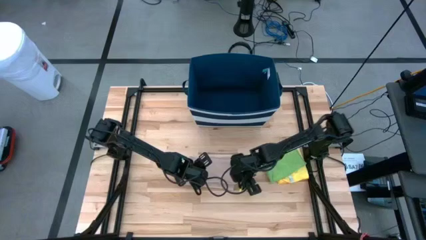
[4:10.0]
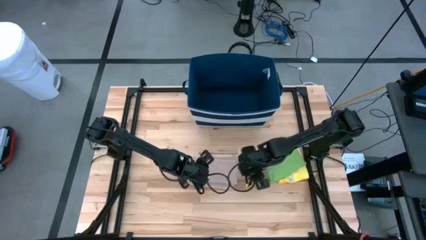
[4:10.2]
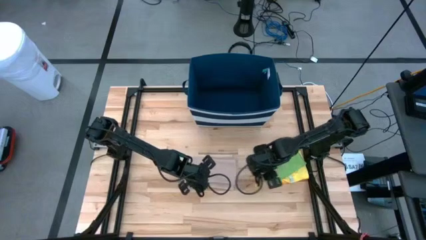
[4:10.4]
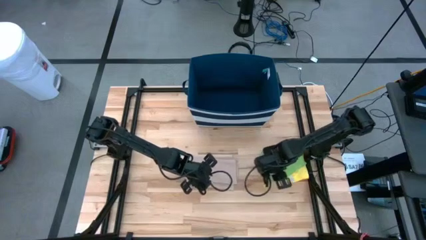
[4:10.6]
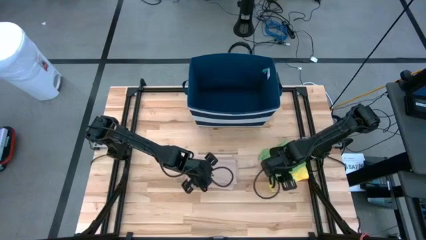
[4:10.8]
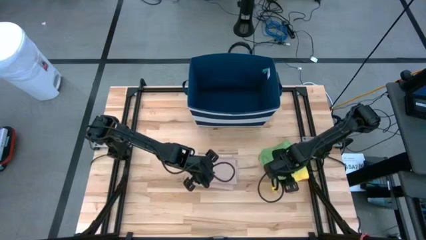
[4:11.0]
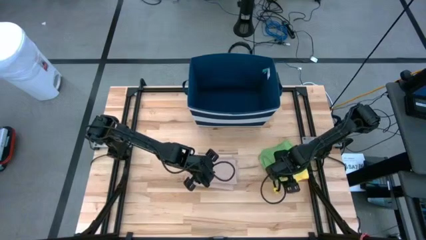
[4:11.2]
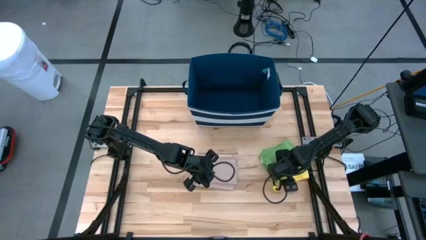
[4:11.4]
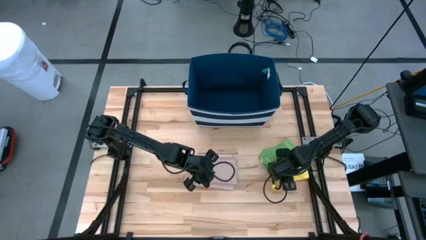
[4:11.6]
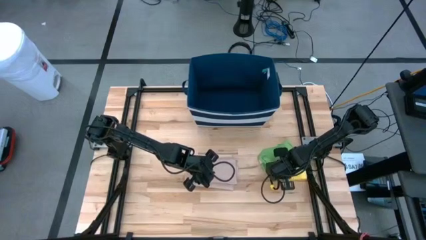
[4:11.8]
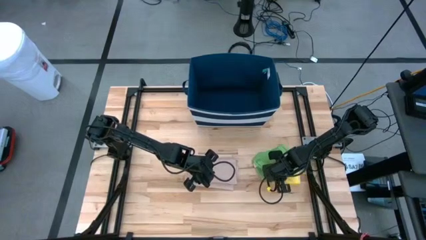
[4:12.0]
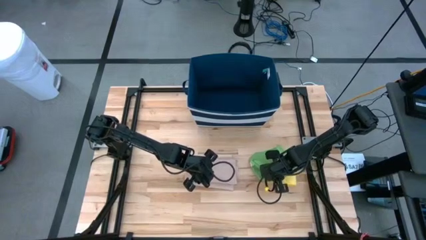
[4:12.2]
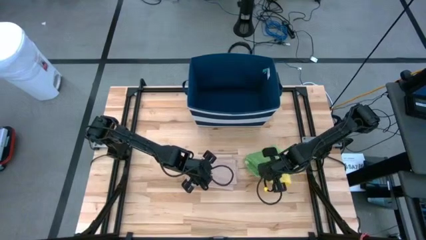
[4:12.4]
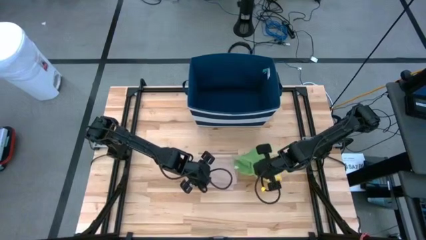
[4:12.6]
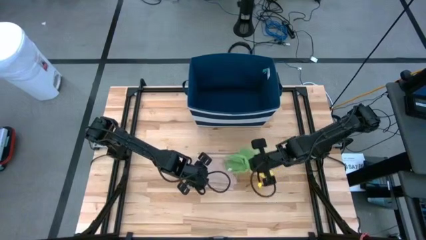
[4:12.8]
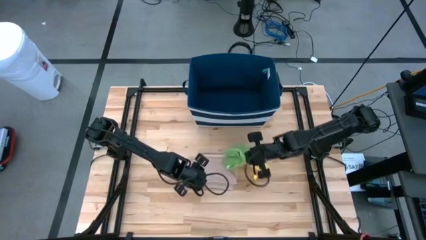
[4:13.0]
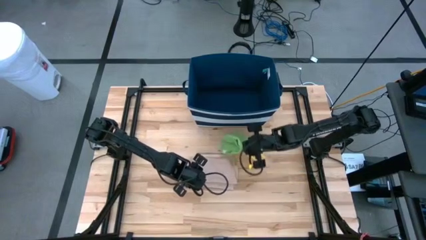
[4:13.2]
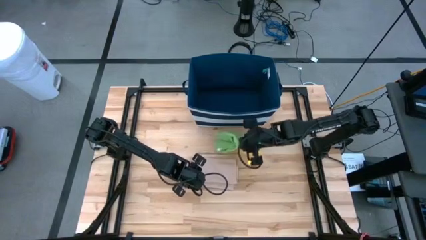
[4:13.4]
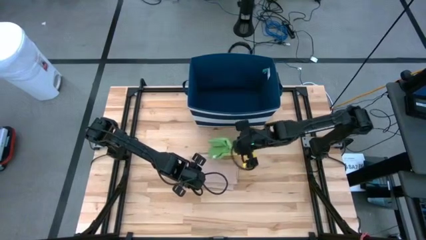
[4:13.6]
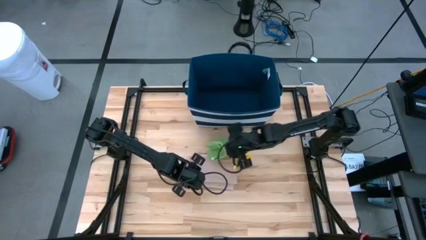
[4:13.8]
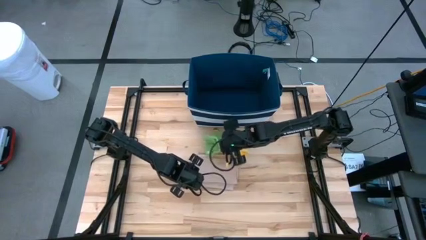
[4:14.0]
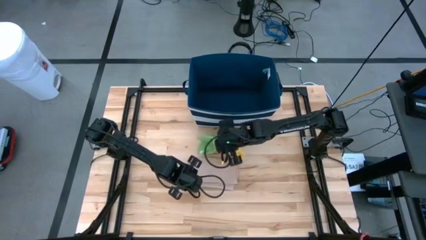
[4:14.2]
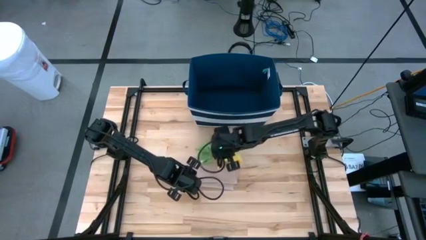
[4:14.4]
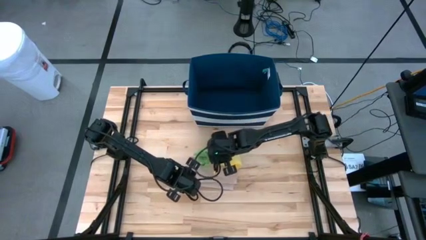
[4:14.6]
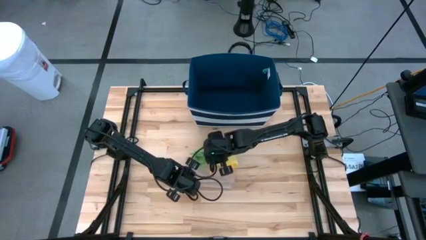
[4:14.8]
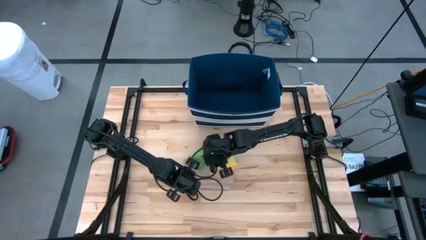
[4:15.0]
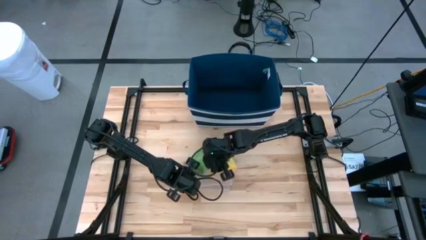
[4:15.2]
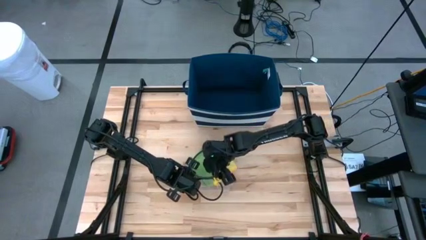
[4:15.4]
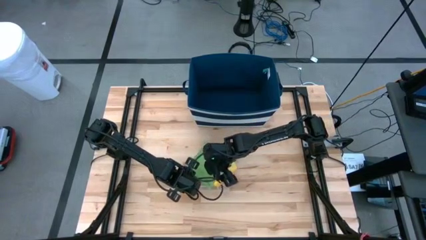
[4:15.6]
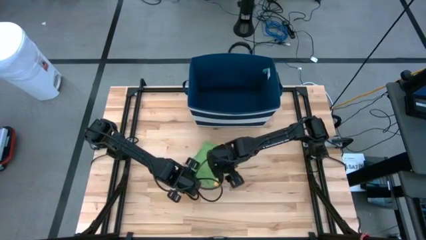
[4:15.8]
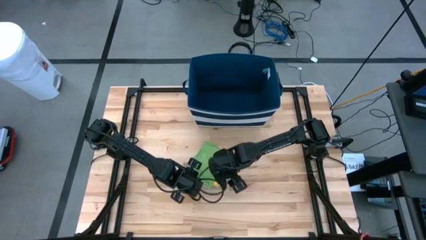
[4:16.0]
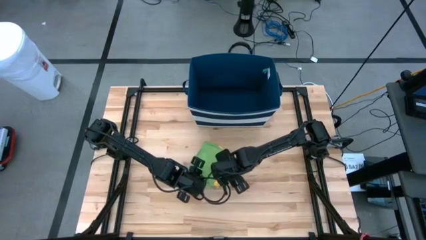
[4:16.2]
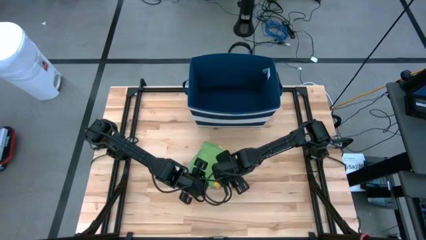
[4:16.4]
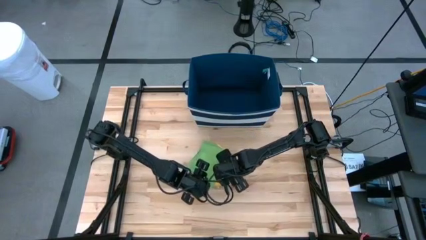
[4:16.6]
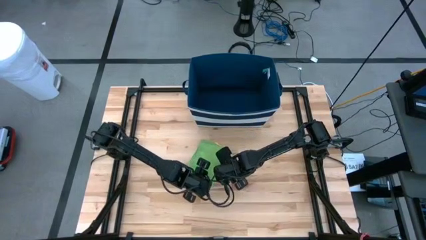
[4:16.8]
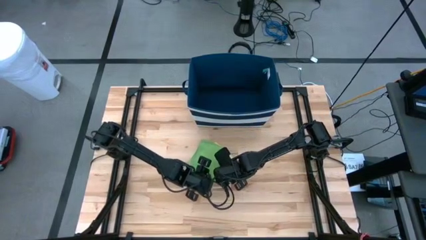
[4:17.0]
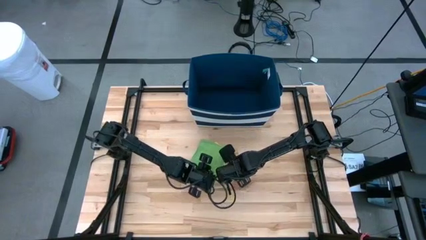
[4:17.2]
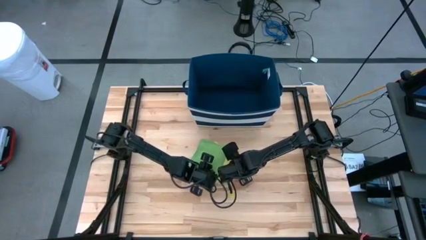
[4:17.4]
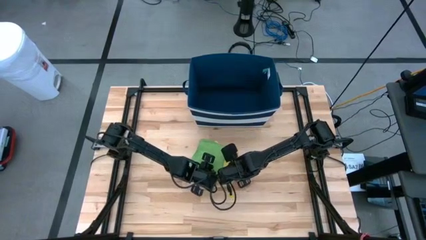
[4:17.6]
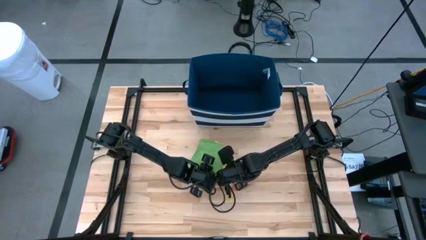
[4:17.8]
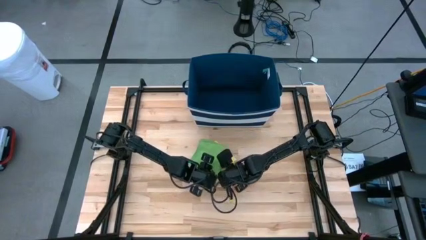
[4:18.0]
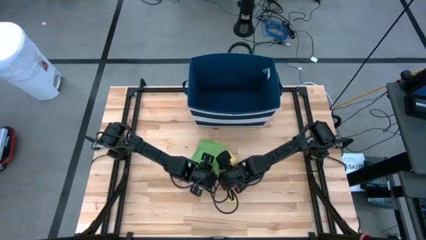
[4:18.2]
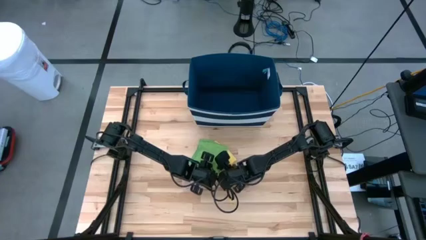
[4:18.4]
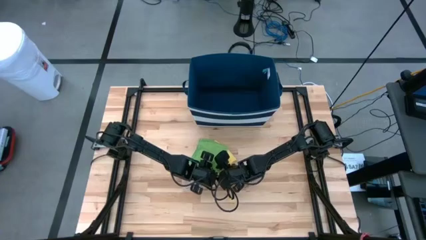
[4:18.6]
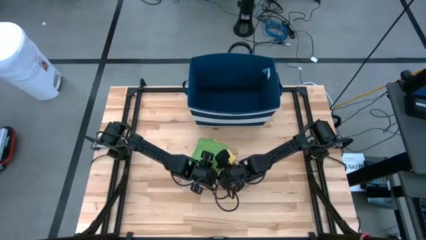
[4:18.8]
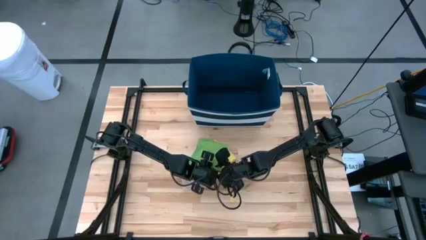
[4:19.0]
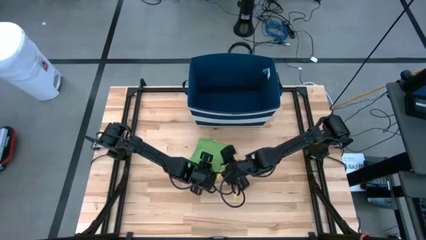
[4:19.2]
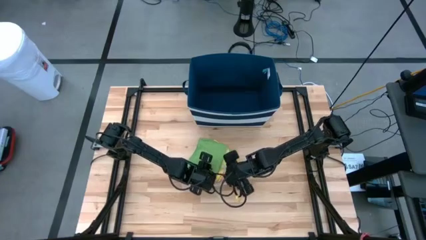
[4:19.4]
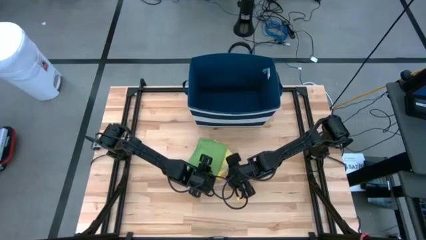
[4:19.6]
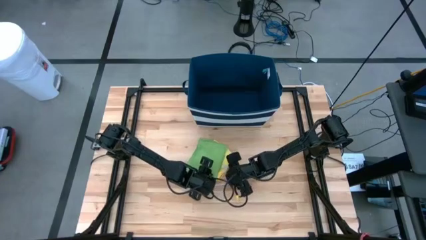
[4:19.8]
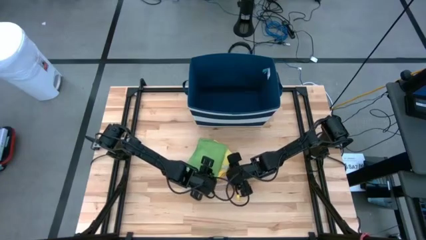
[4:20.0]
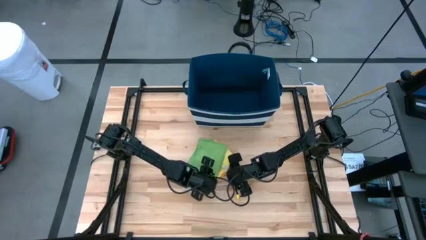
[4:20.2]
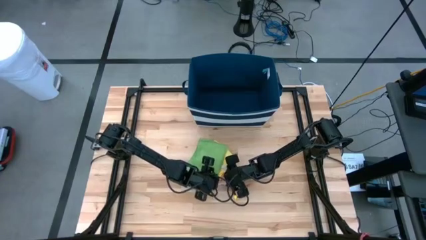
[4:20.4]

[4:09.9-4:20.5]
Task: Fold towel
Stack the folded towels on the light brown towel

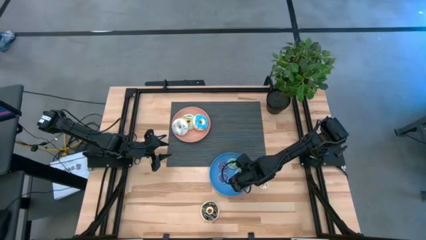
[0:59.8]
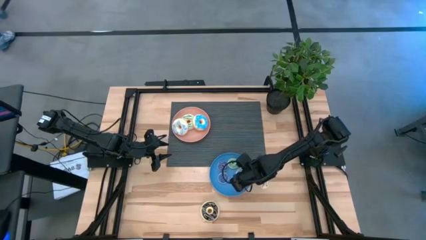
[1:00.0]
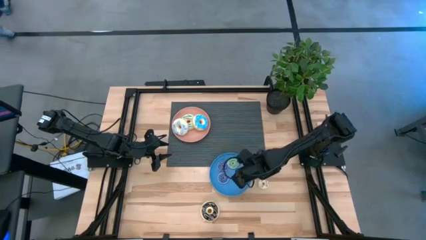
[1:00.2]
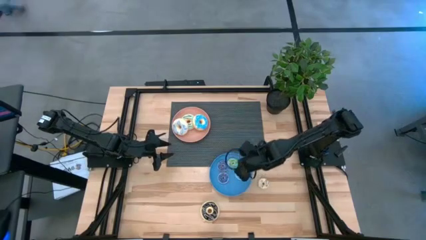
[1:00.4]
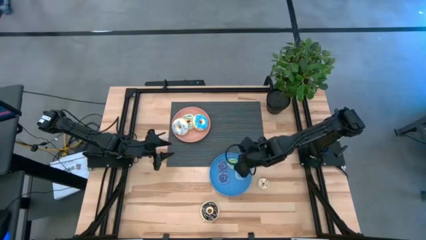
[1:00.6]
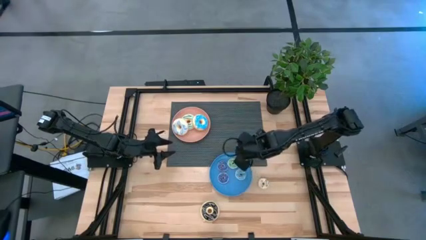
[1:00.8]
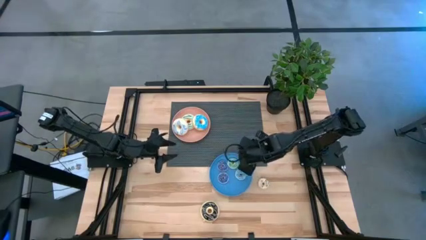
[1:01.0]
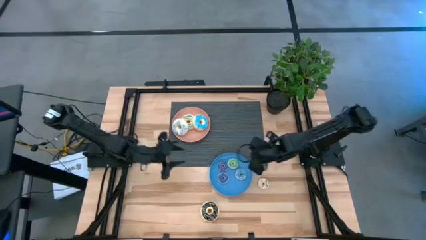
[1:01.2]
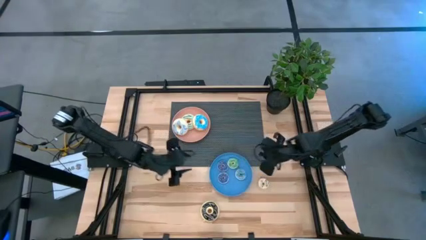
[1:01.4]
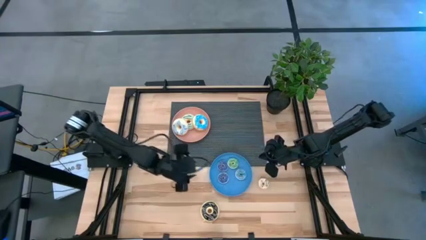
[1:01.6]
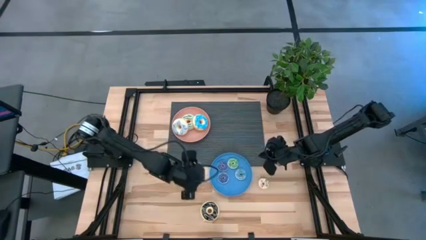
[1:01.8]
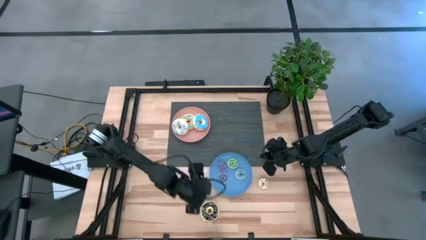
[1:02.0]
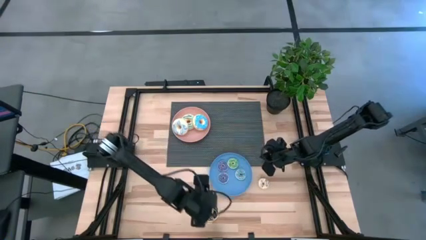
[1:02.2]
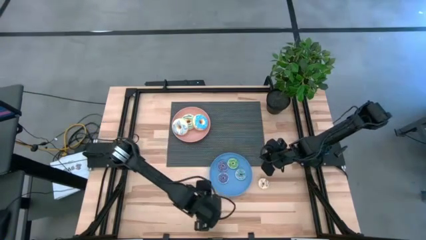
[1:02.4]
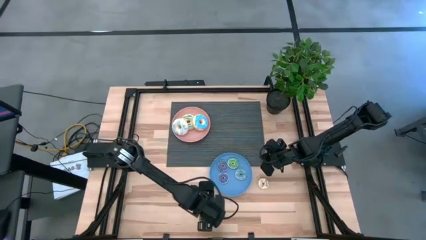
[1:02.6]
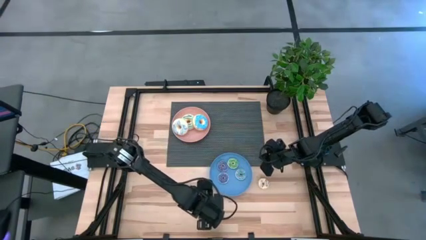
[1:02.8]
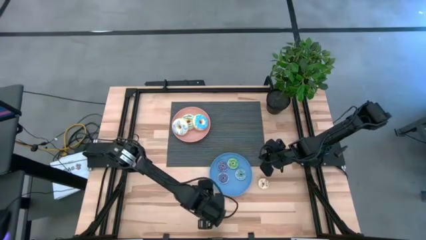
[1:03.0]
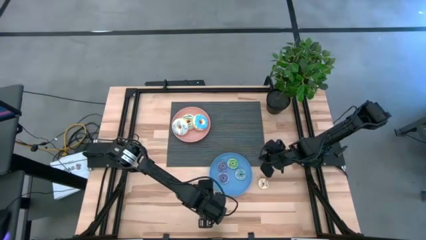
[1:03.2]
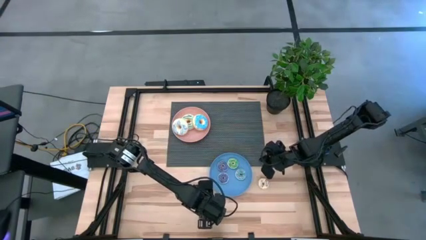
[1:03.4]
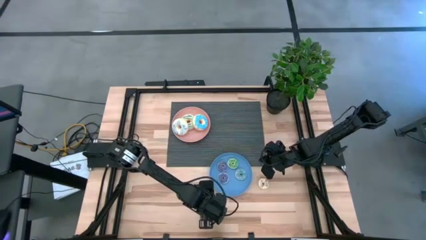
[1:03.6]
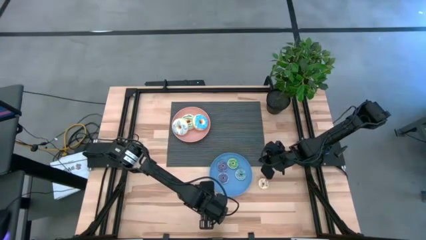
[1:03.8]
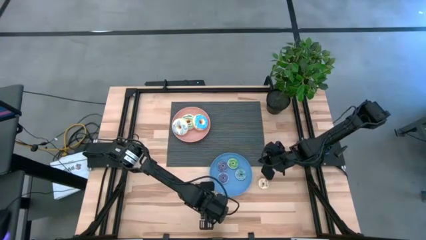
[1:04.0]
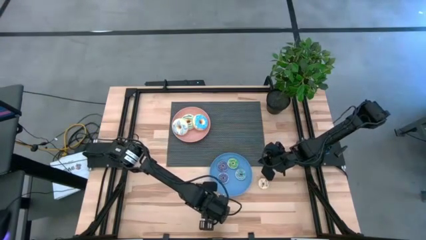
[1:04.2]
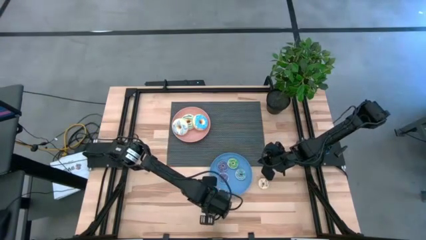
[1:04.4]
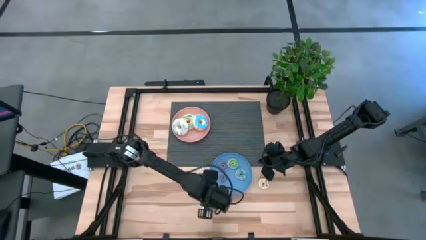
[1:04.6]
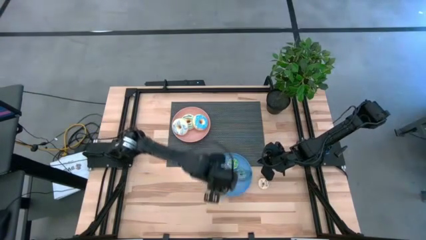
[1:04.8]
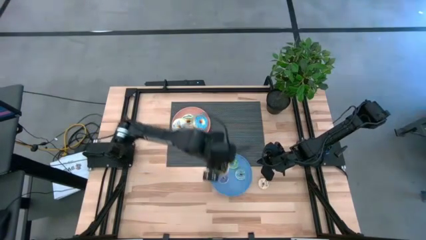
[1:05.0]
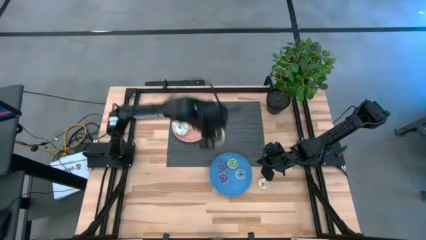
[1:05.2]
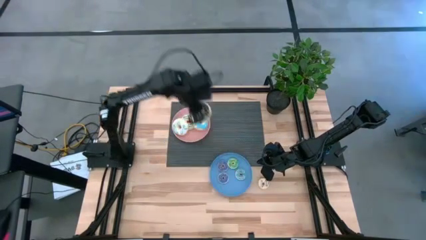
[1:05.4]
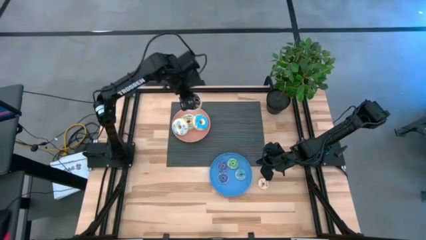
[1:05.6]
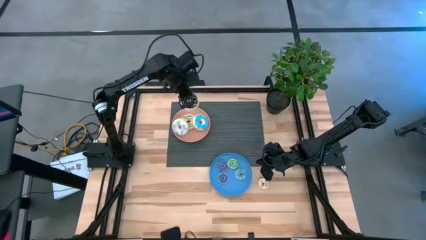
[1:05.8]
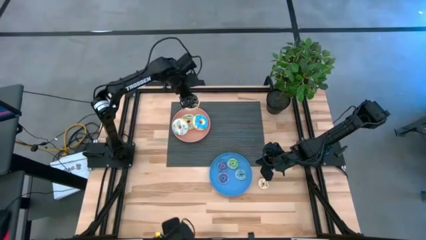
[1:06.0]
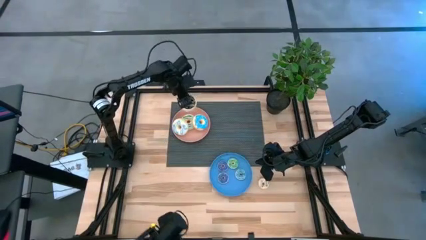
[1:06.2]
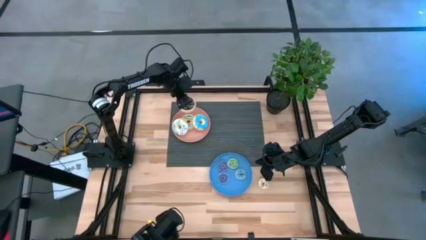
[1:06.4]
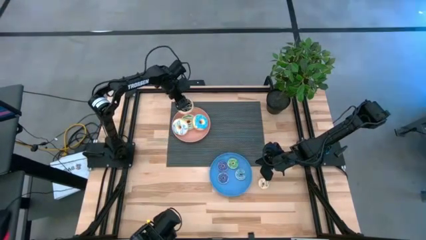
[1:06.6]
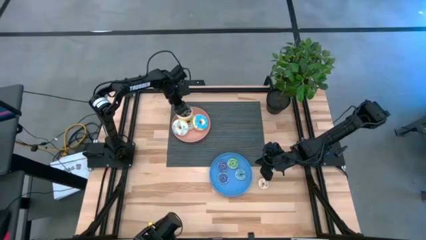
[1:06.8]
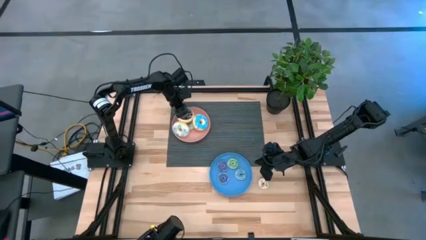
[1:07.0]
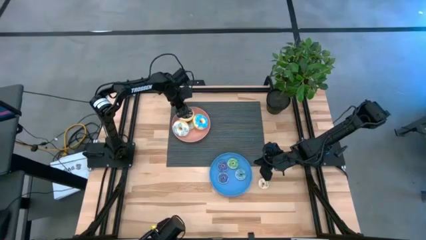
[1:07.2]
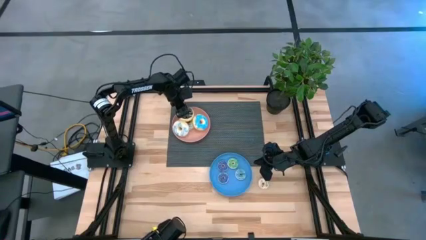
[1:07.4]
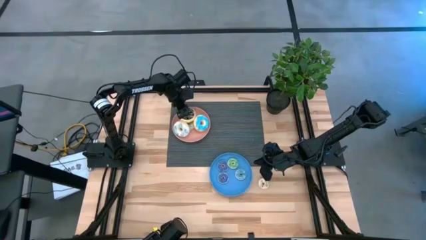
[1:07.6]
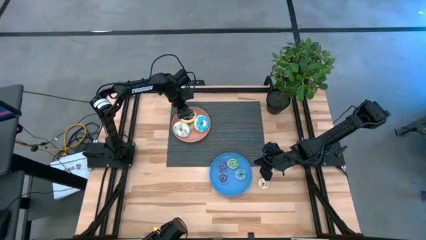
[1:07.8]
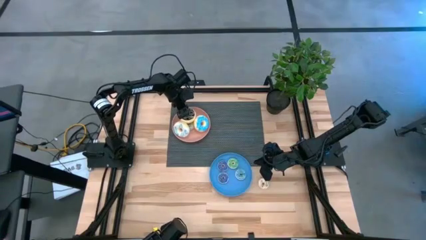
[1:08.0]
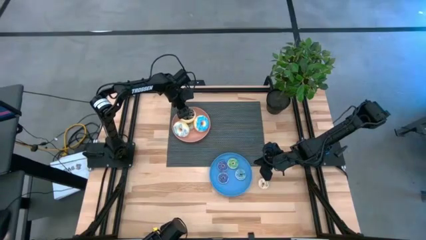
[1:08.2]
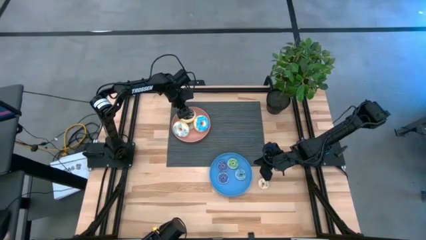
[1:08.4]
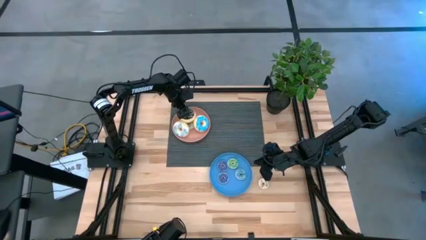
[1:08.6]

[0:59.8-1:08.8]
Task: Pick & Place donuts
Put the large black donut into the pink plate
